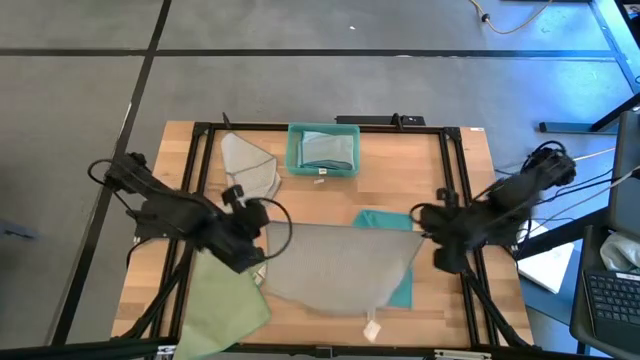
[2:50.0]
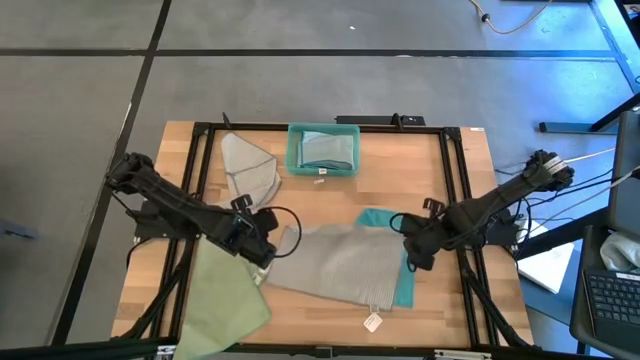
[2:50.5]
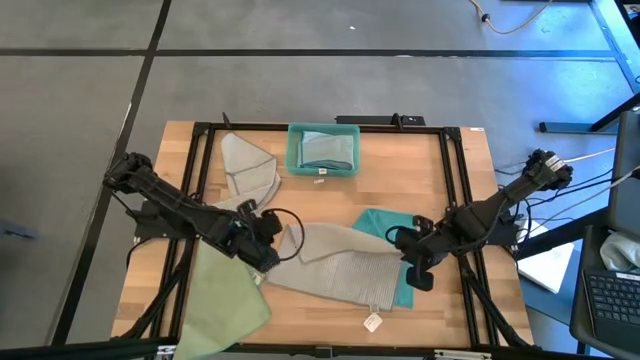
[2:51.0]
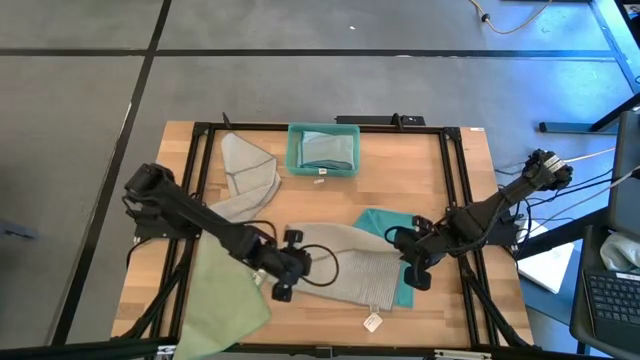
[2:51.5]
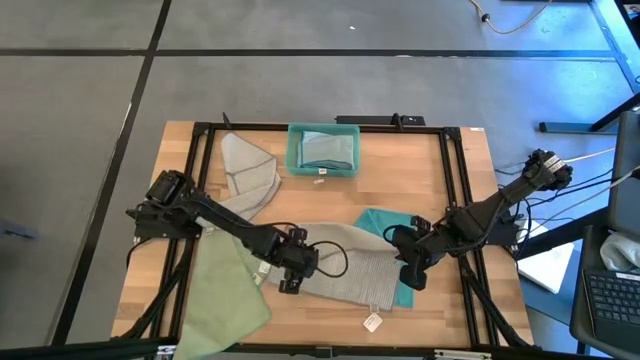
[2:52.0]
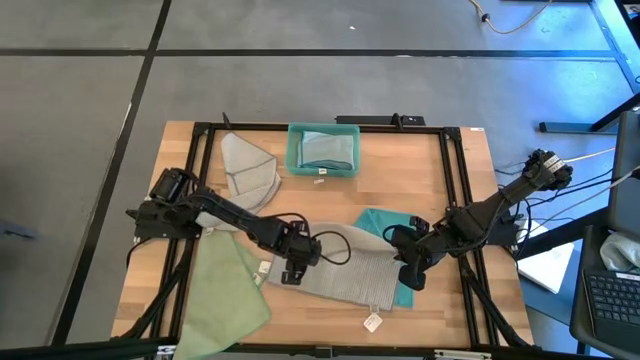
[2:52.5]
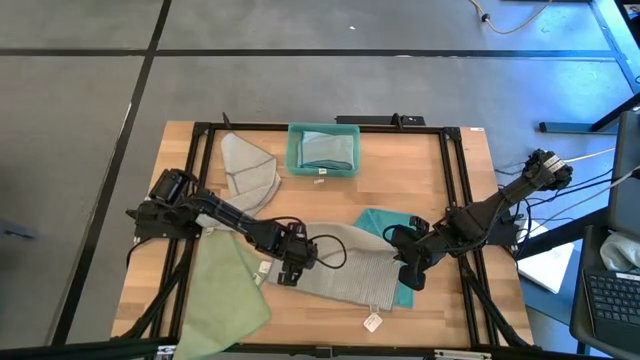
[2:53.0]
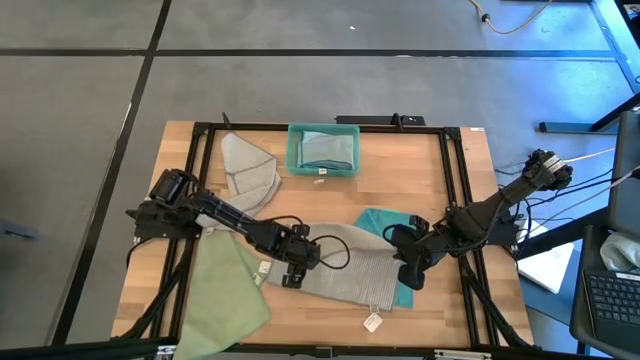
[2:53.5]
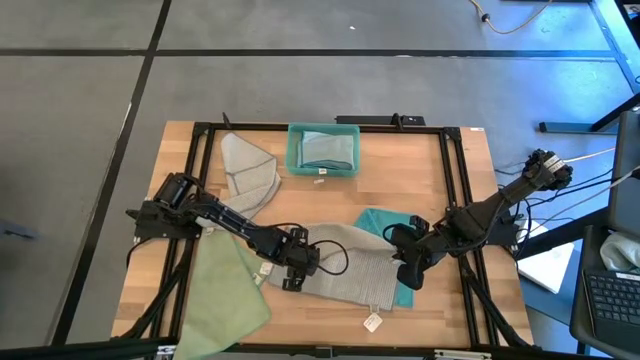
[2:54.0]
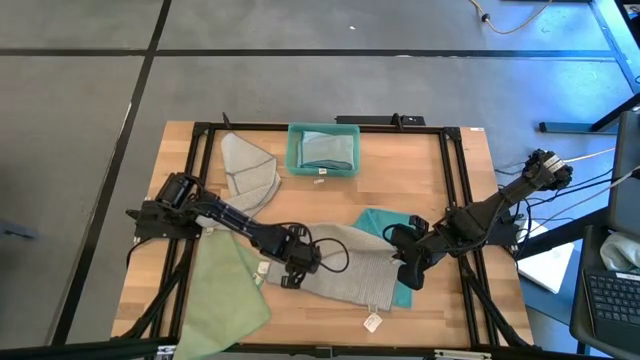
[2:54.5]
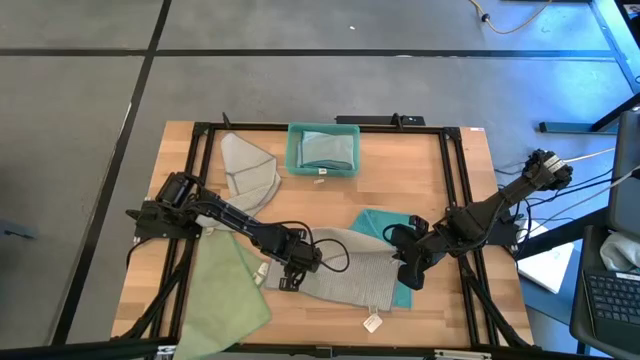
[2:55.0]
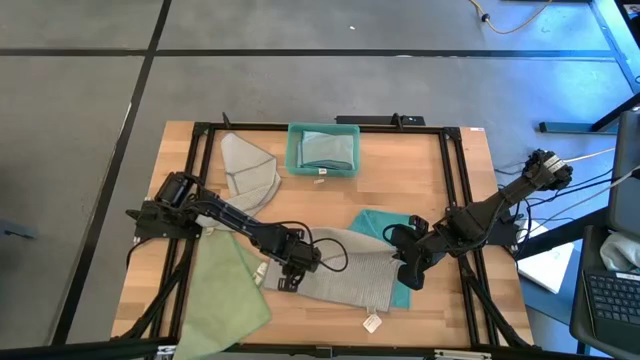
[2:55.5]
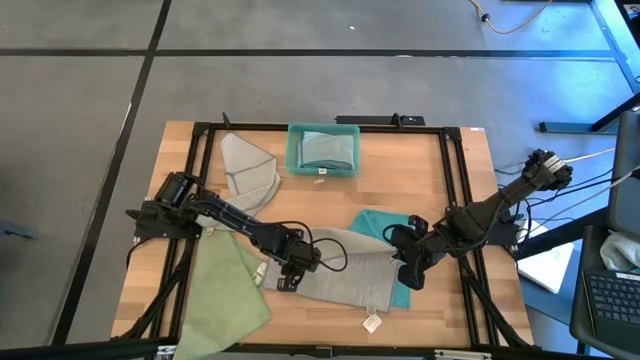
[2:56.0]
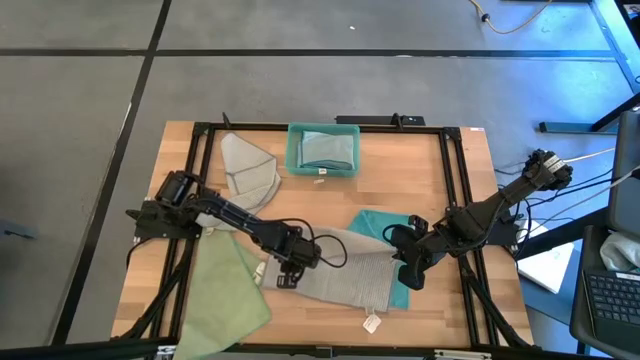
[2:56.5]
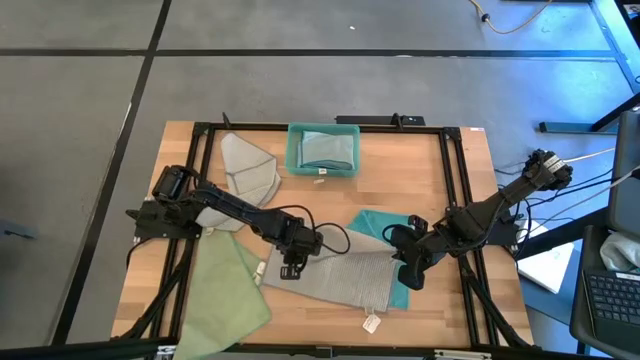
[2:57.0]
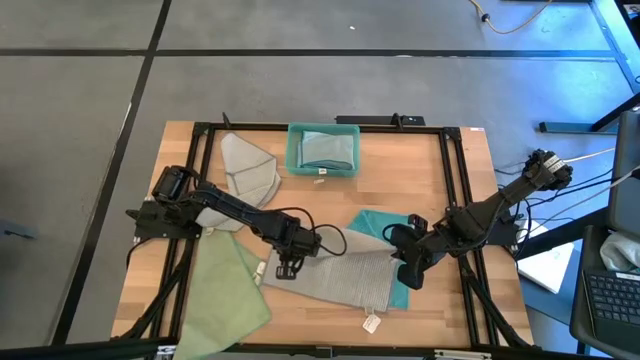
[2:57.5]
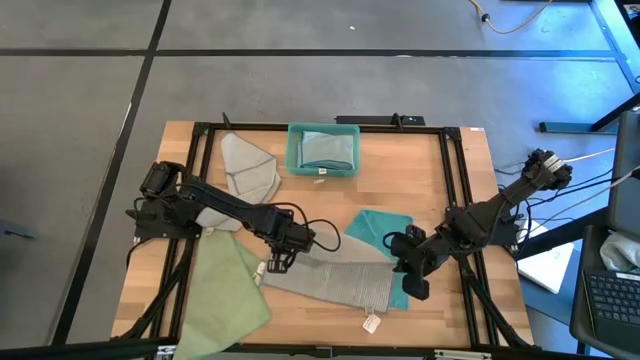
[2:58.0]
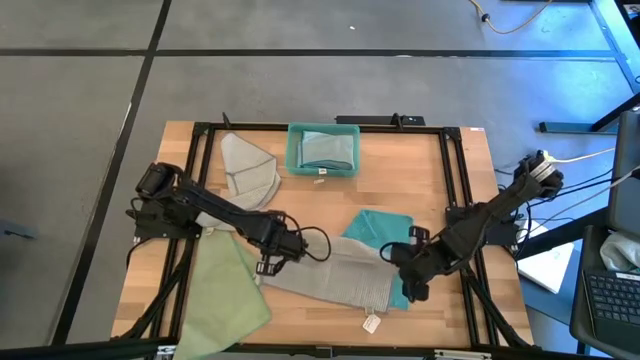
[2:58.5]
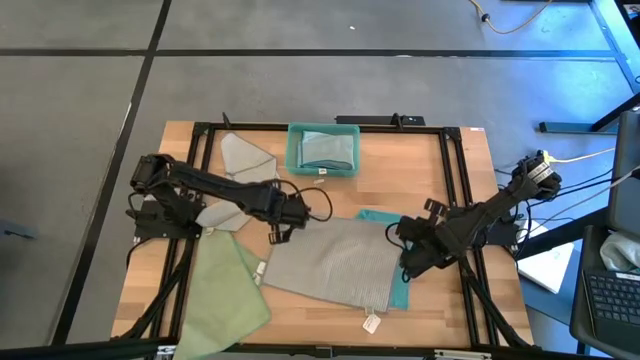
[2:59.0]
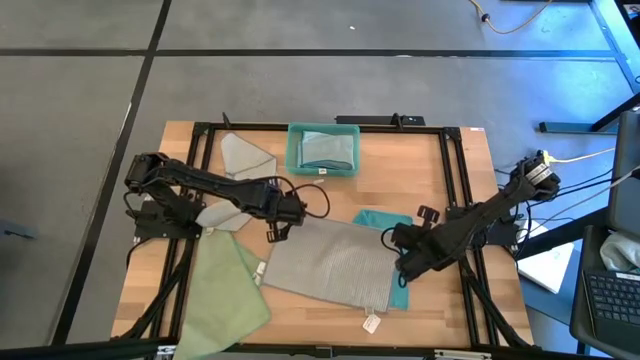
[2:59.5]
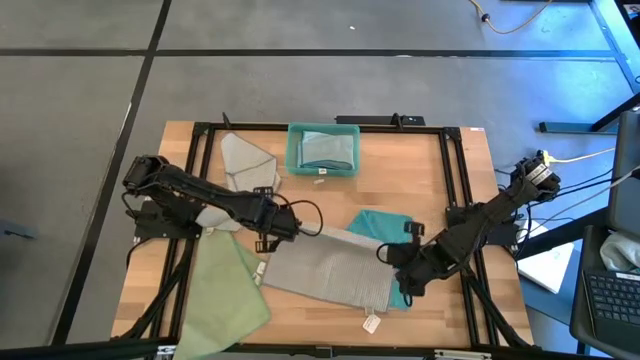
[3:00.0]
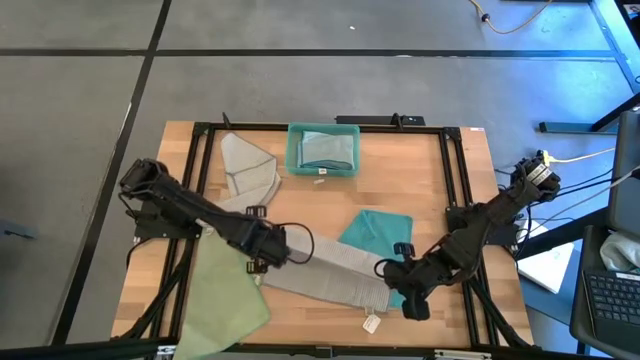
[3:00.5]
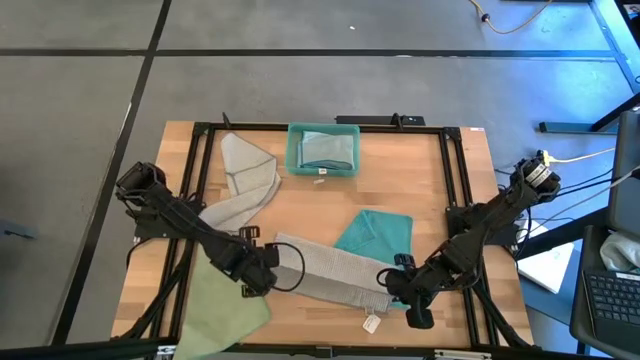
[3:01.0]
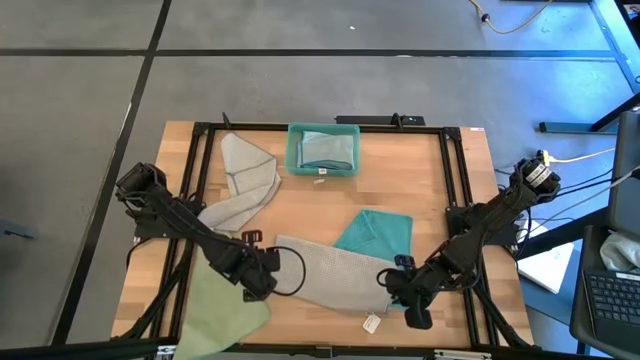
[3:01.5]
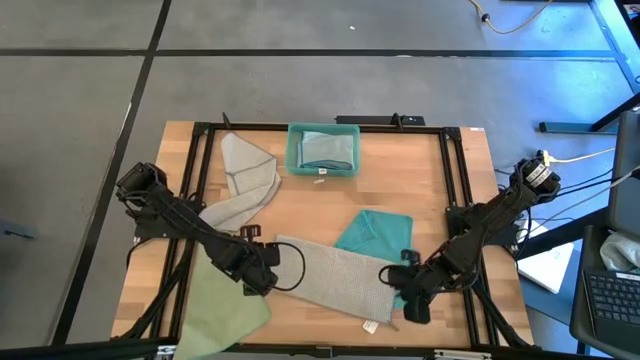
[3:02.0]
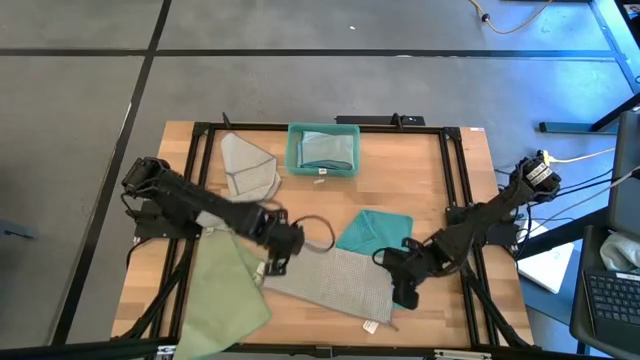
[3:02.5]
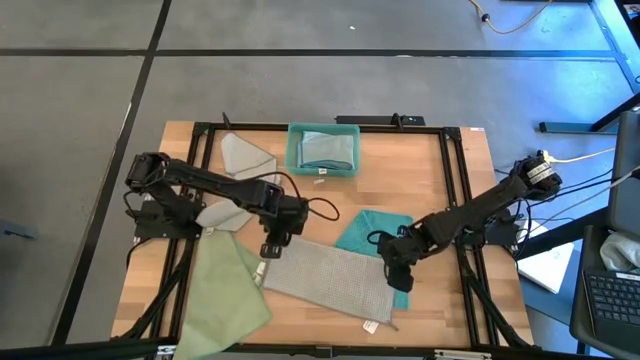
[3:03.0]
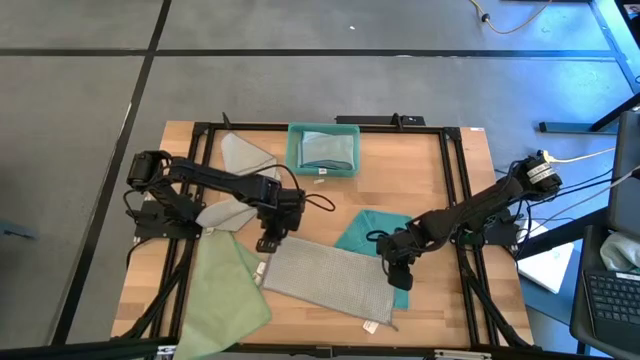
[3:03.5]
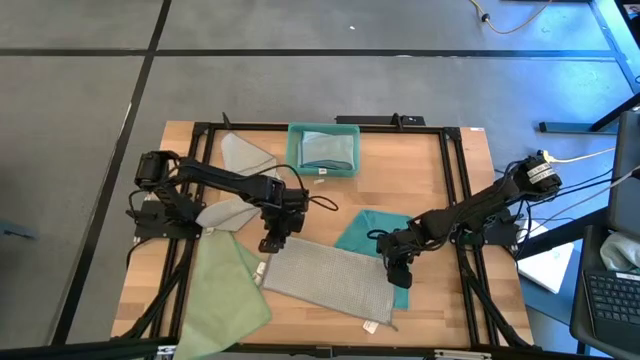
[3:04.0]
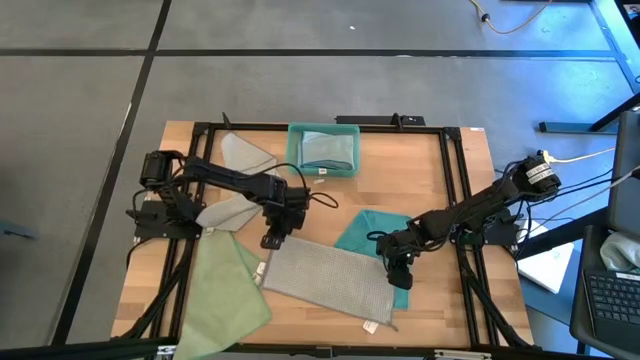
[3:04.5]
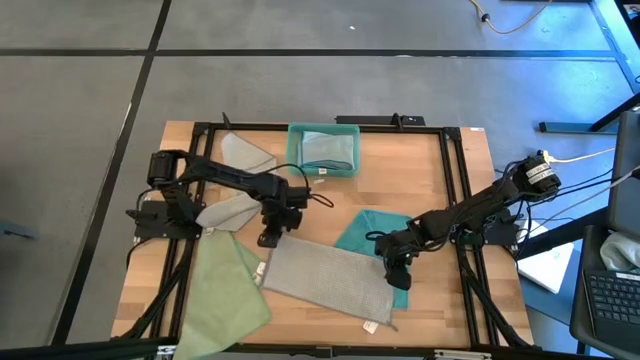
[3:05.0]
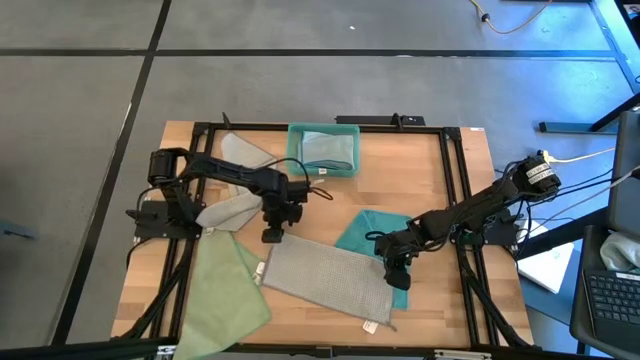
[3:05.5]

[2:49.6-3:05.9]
Task: Fold microfiber towels
Fold the gray towel

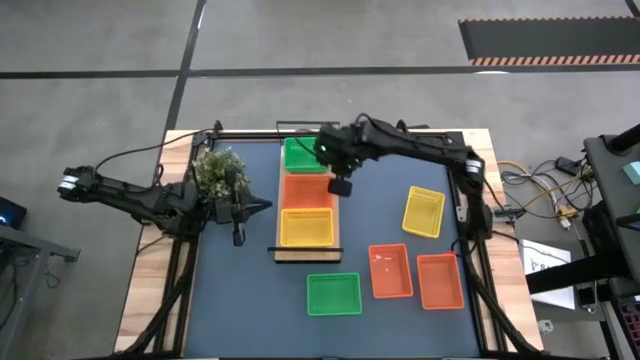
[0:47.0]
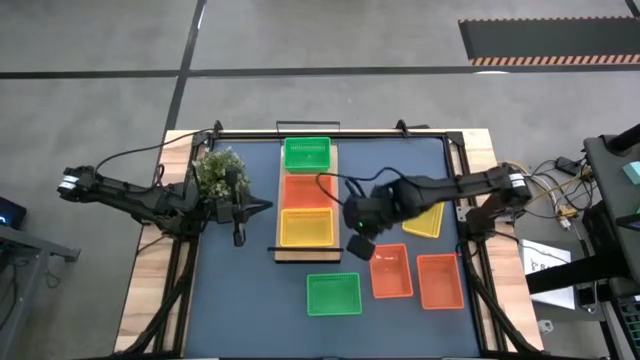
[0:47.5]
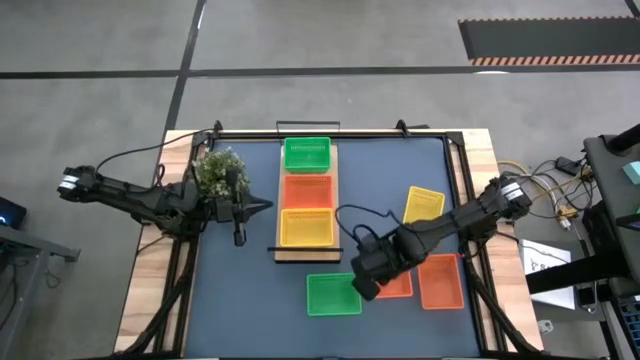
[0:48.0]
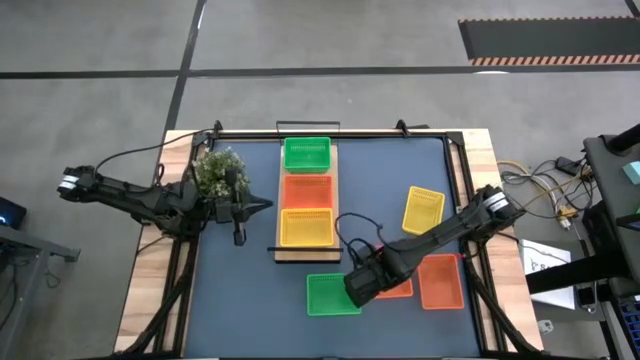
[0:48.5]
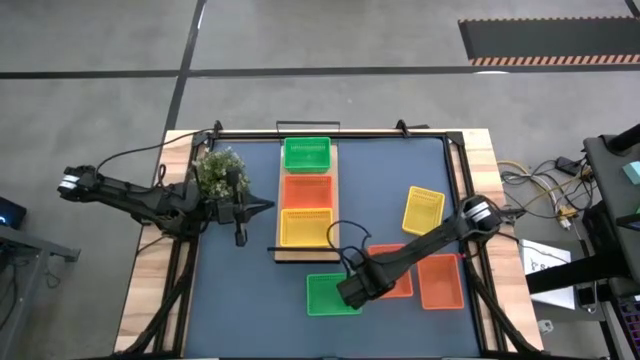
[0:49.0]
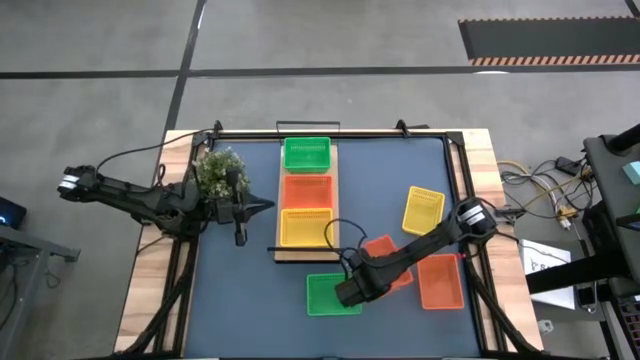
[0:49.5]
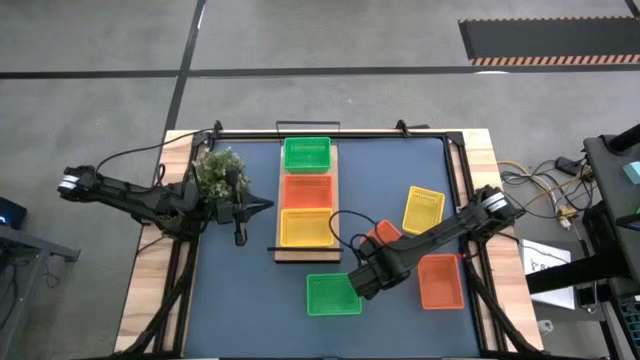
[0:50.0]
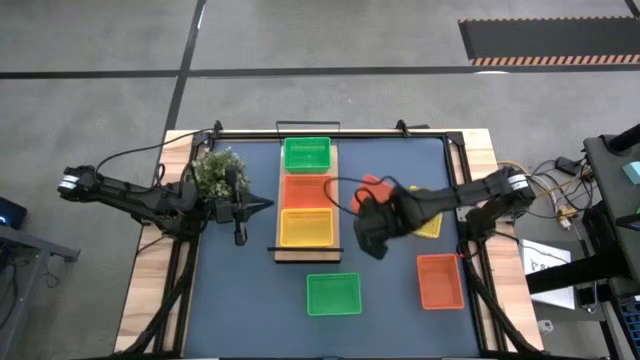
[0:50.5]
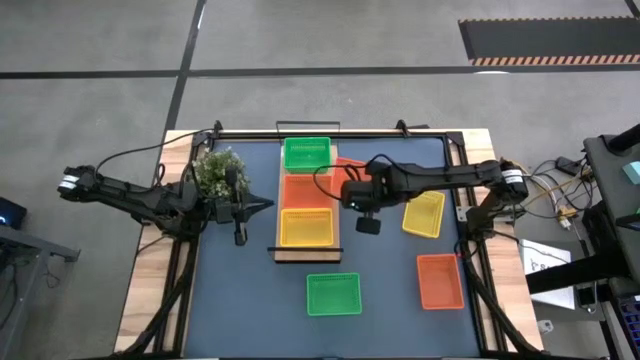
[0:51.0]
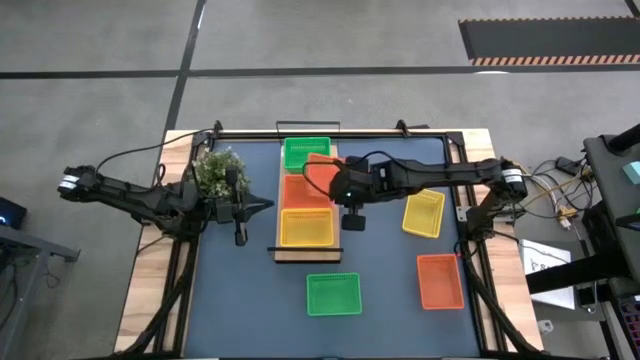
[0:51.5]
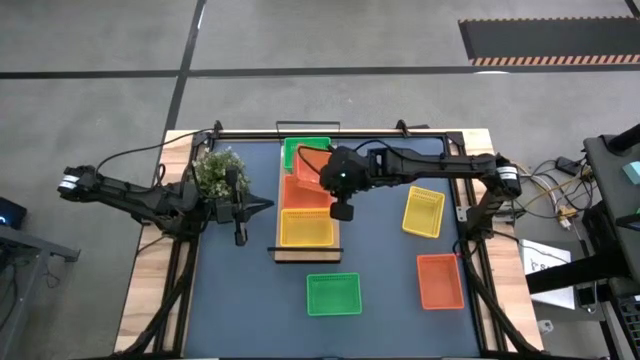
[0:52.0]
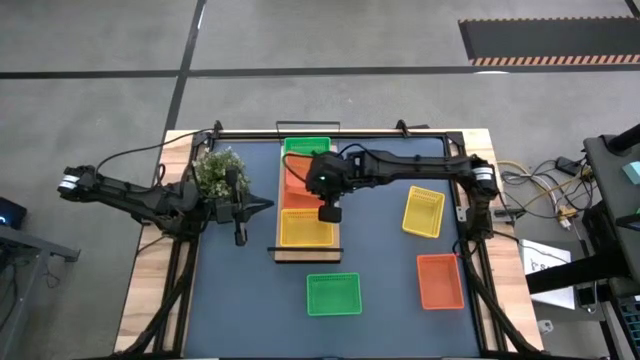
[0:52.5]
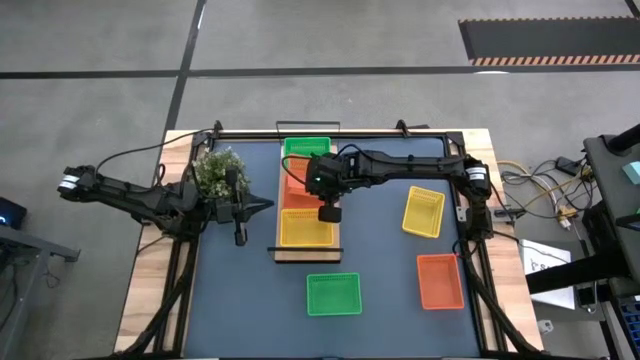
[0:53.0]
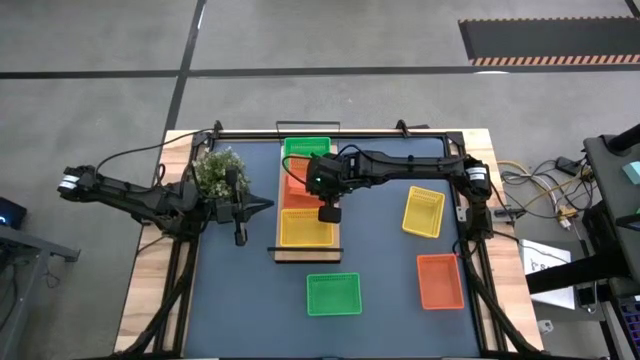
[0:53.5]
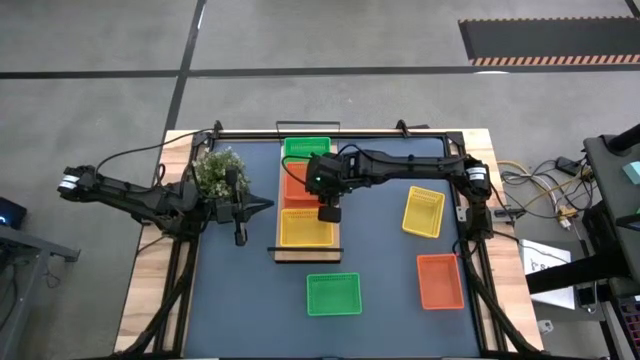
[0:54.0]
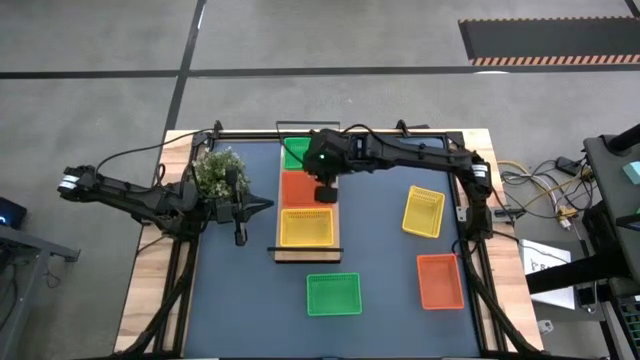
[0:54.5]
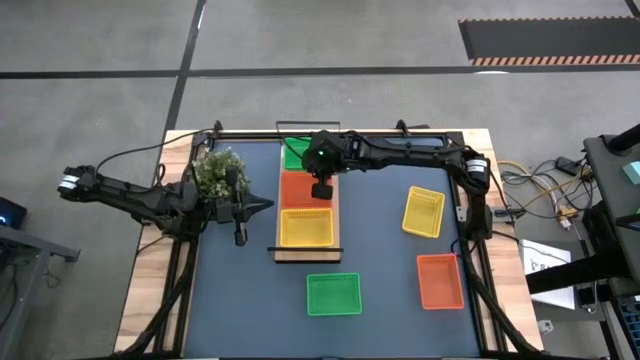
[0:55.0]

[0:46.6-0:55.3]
Task: Stack baskets on shelf by color
Stack the left orange bin on the orange bin on the shelf
